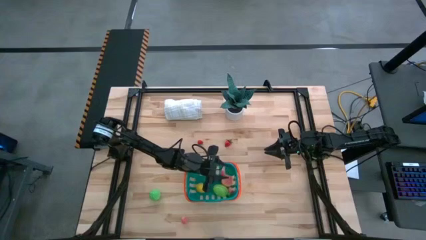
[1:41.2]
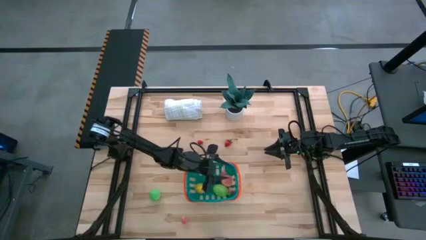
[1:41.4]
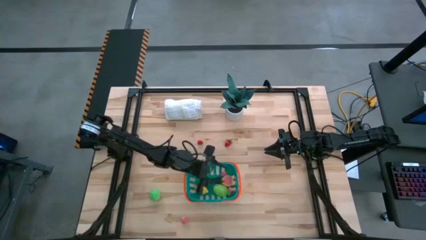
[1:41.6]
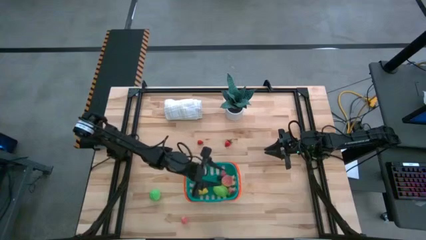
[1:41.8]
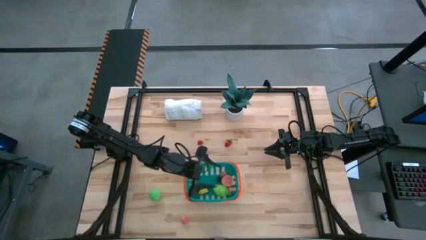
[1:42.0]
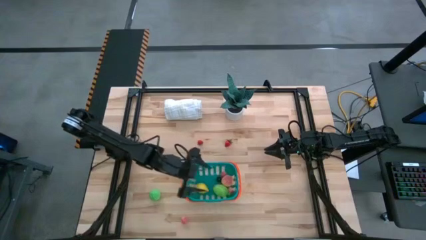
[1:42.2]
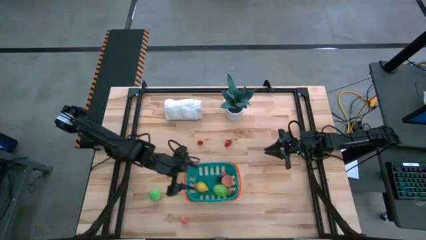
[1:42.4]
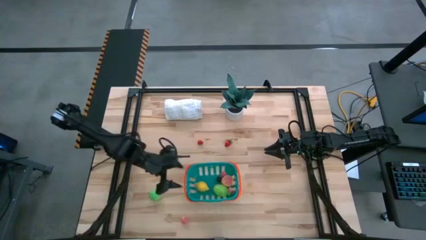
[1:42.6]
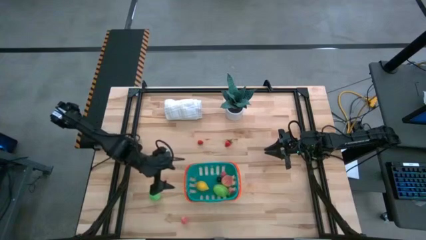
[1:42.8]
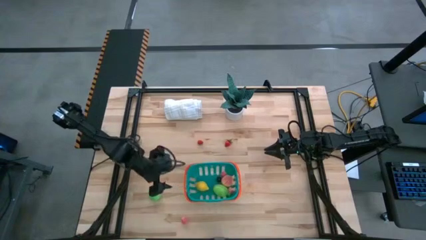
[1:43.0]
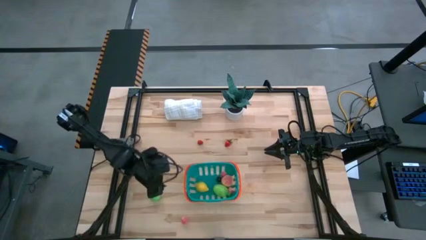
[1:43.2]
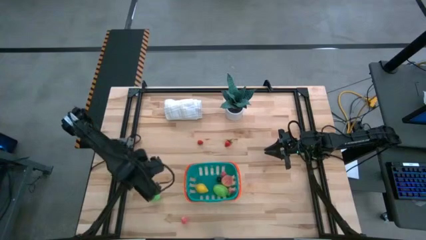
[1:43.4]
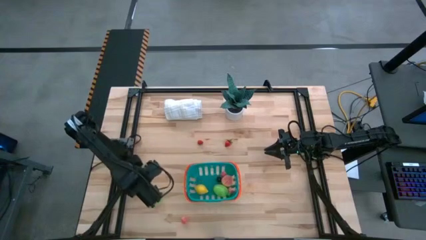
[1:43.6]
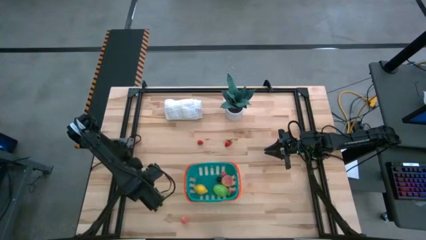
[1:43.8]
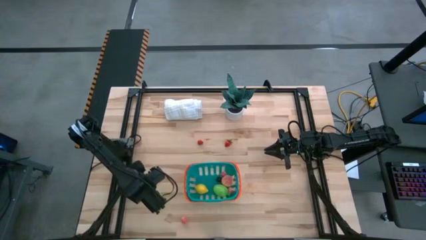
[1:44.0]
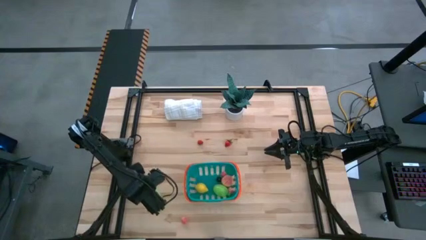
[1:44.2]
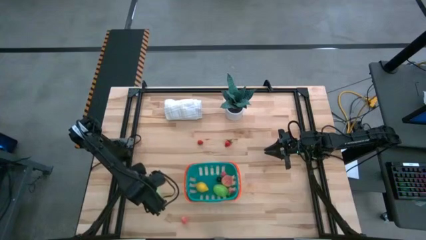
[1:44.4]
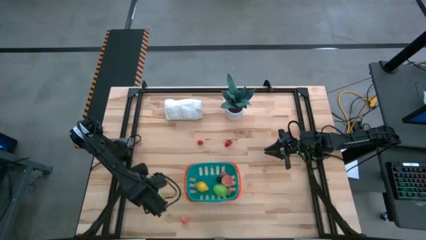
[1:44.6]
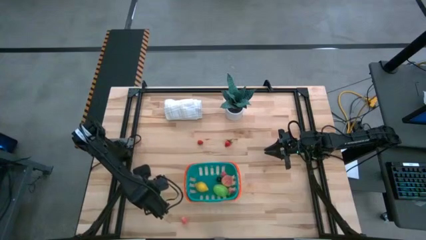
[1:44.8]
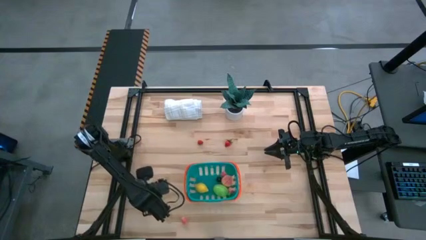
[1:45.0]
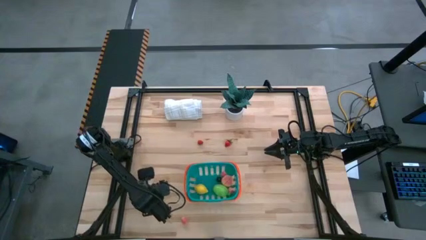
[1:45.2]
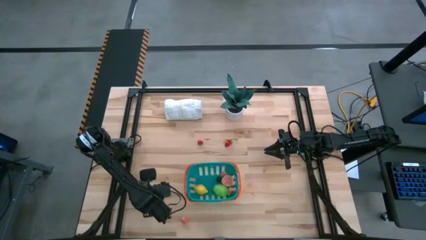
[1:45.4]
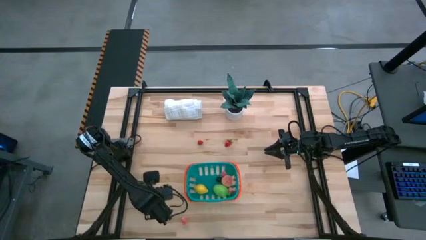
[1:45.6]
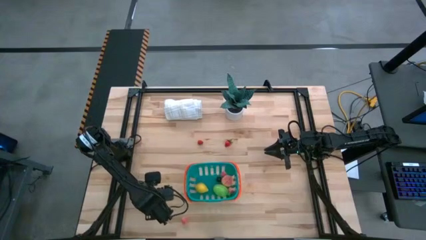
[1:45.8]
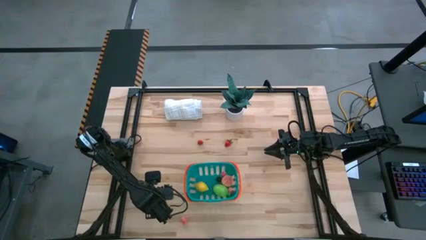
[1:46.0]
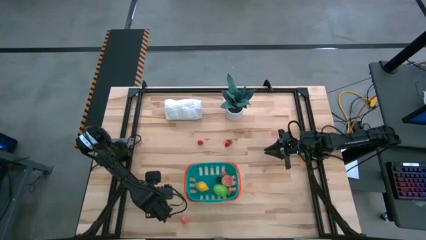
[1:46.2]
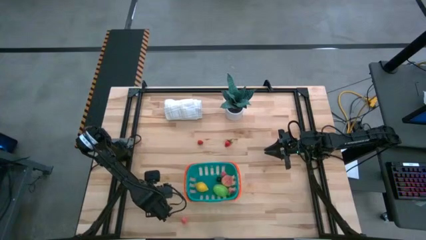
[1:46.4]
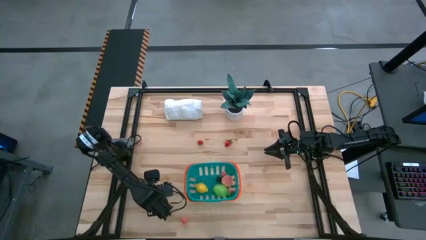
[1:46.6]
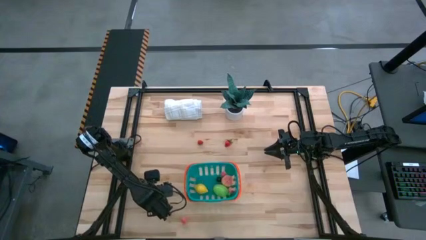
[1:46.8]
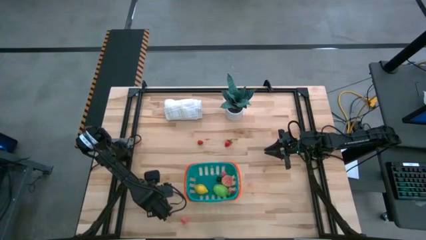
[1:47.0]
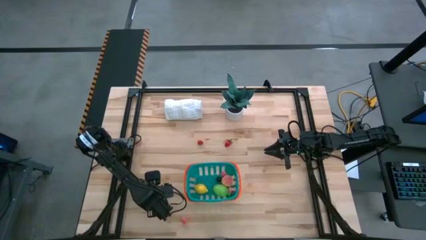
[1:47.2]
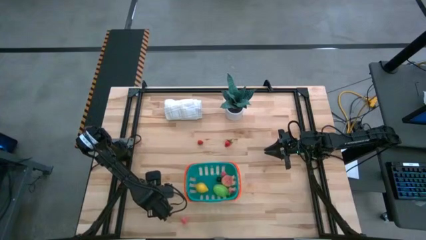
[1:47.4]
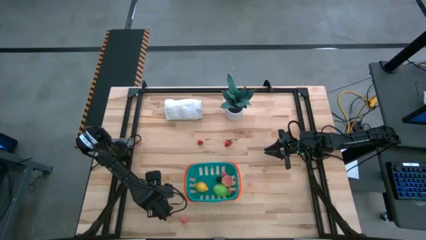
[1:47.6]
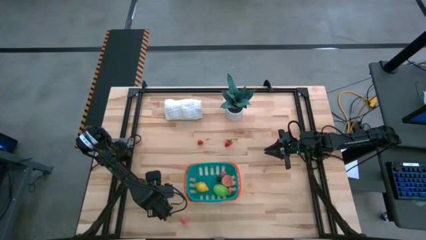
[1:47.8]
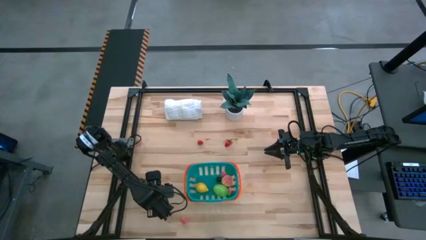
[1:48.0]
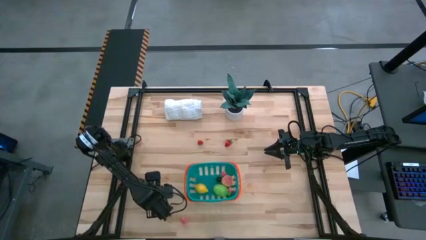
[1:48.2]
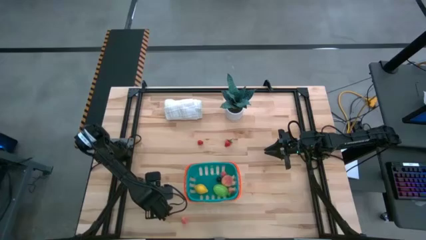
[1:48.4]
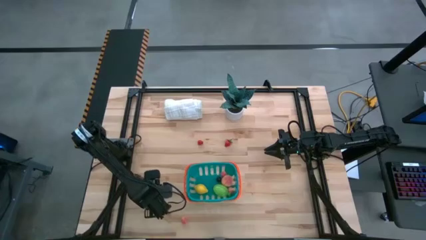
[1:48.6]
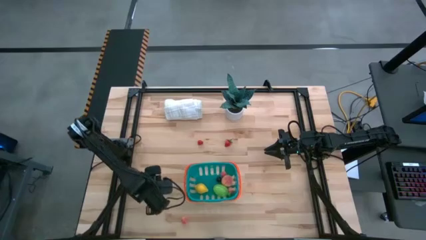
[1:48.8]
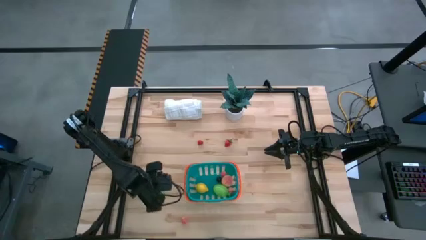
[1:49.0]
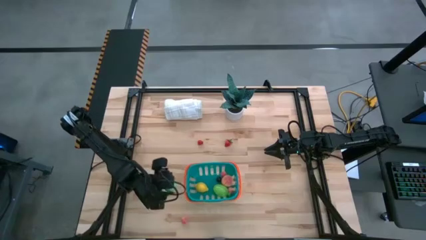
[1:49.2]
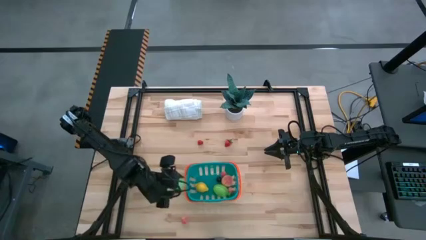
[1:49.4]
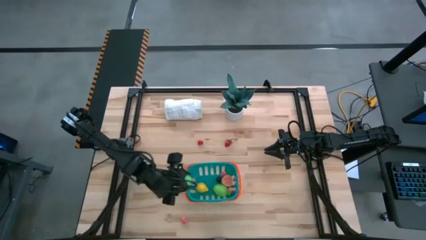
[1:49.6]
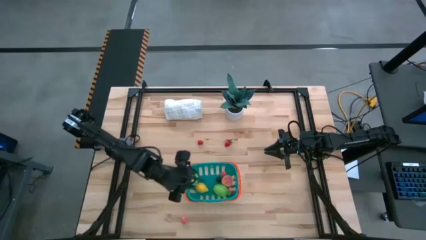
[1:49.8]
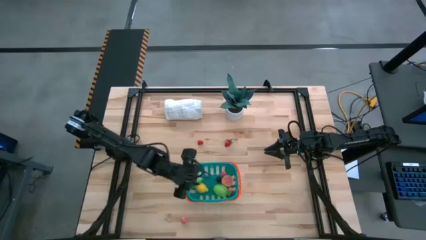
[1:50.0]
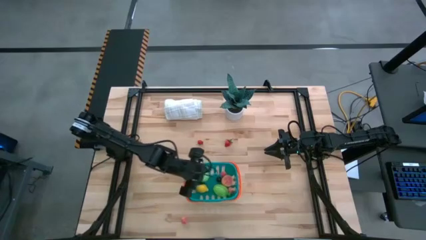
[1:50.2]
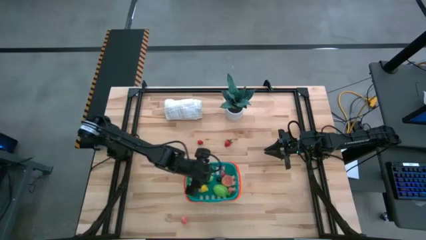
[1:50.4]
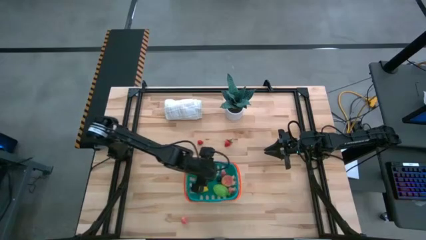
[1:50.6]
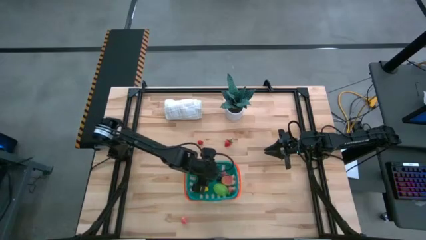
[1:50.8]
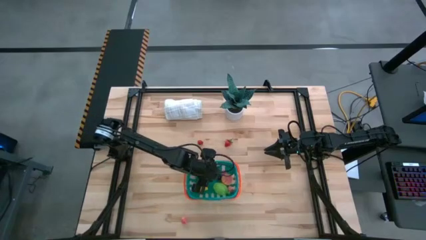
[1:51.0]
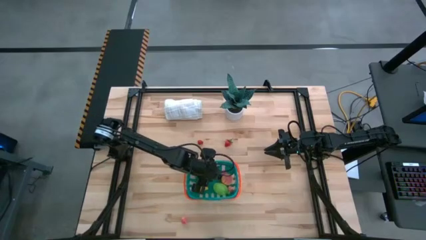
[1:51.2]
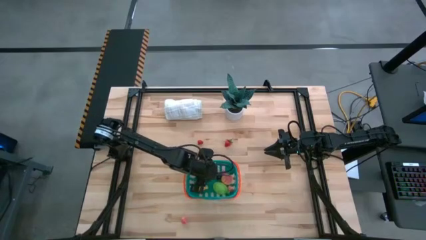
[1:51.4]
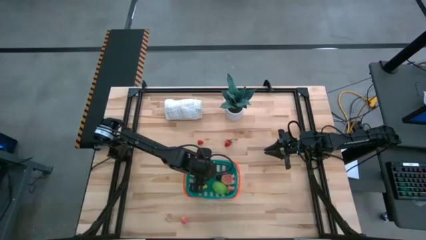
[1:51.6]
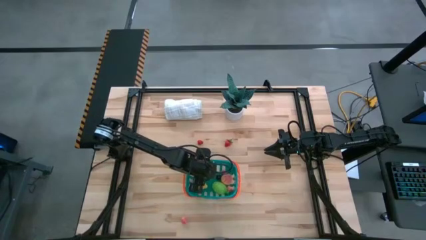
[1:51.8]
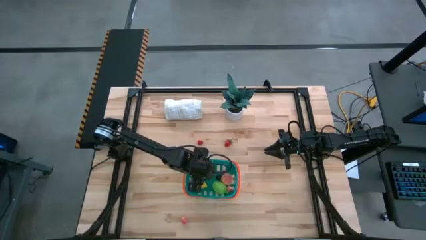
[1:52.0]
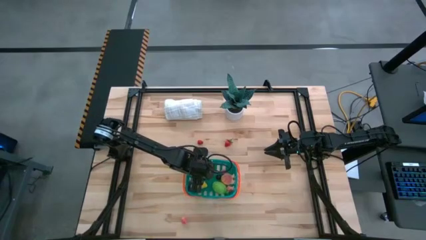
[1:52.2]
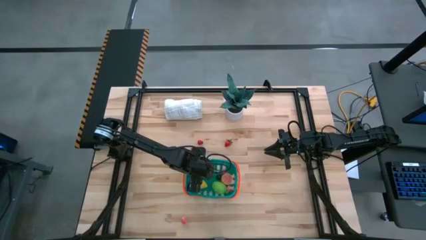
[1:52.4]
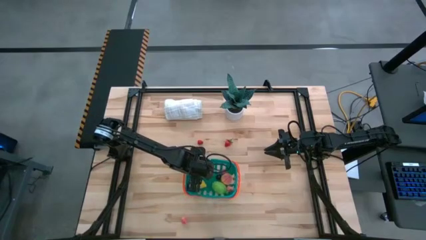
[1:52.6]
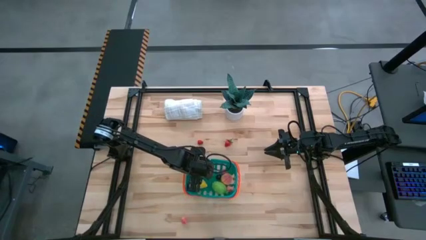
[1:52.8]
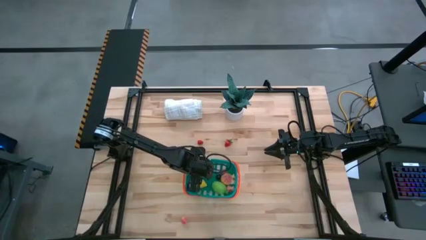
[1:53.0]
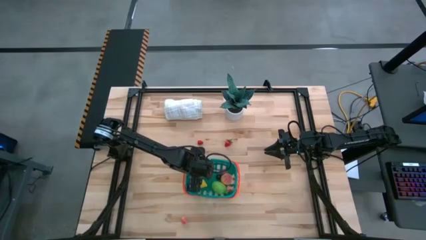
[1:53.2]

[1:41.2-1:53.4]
Task: Pick and placing Produce into tupperware
Put the green pear into the blue bin

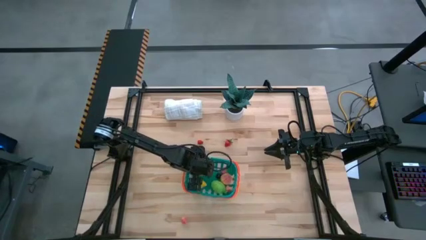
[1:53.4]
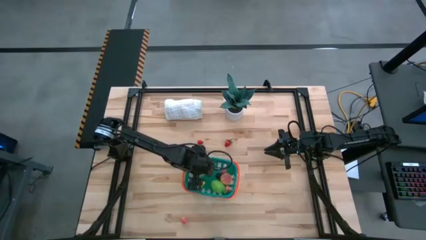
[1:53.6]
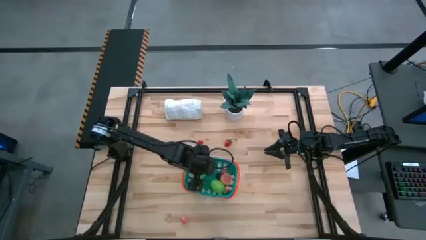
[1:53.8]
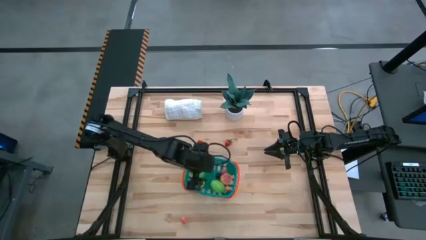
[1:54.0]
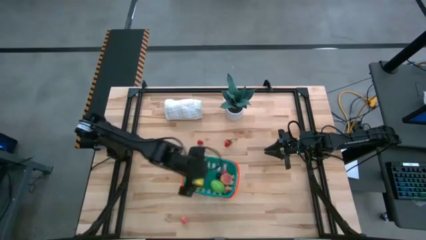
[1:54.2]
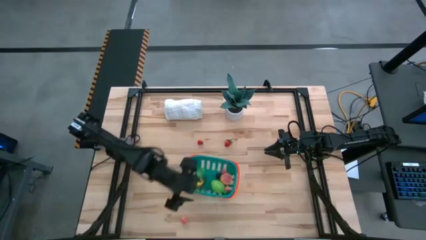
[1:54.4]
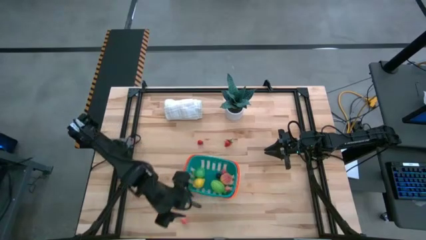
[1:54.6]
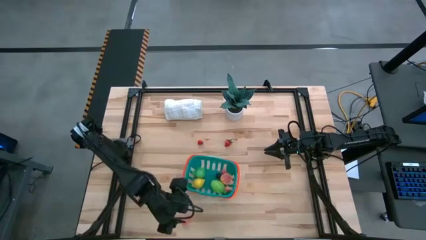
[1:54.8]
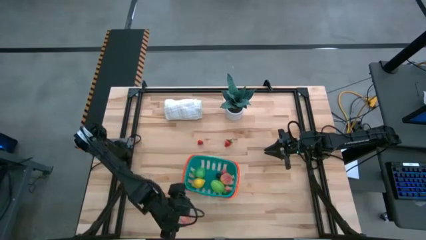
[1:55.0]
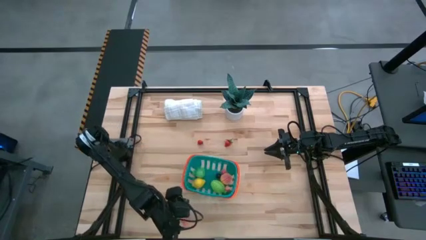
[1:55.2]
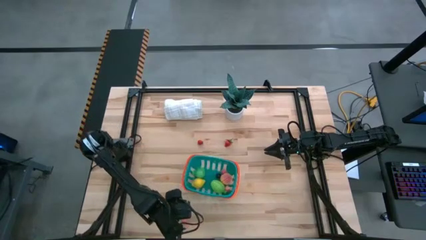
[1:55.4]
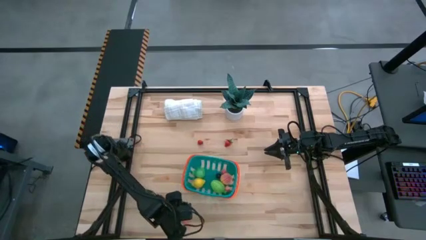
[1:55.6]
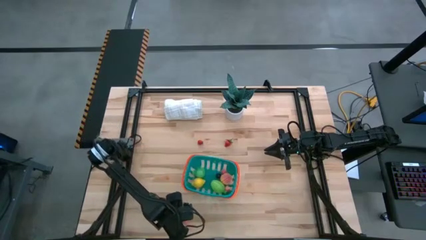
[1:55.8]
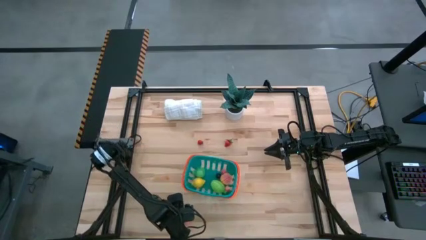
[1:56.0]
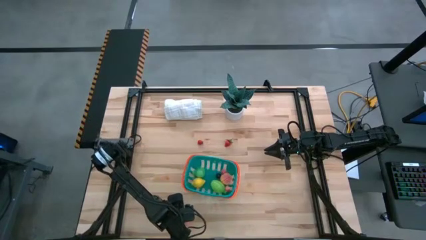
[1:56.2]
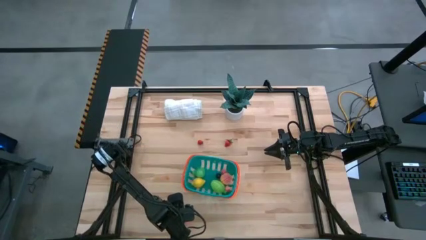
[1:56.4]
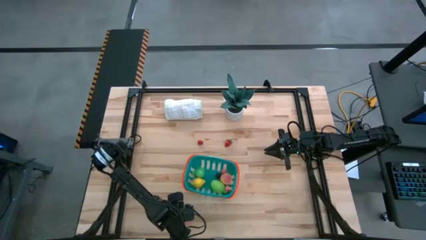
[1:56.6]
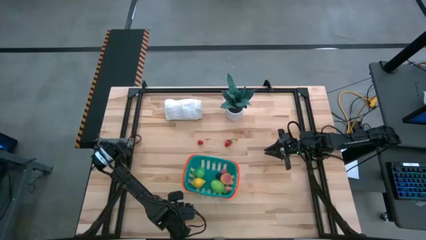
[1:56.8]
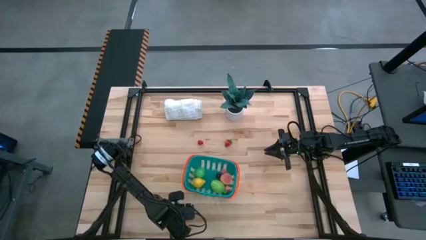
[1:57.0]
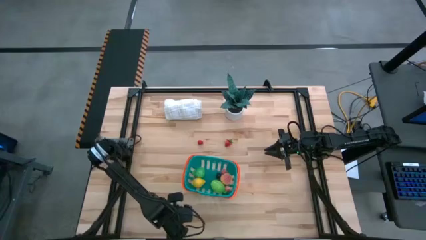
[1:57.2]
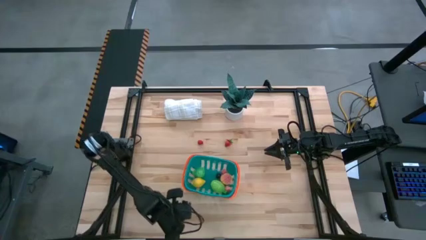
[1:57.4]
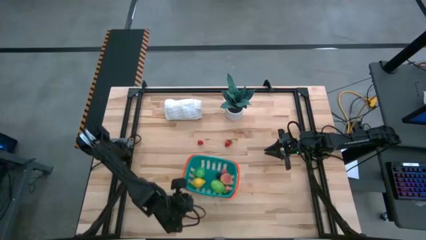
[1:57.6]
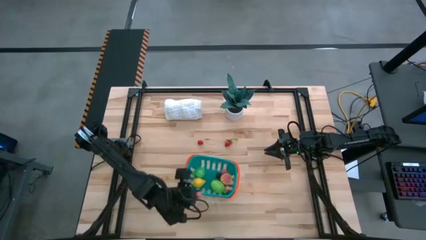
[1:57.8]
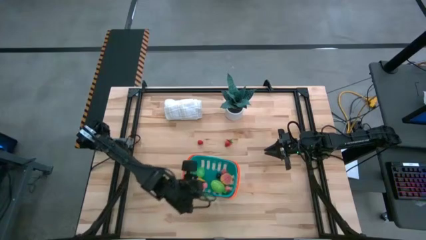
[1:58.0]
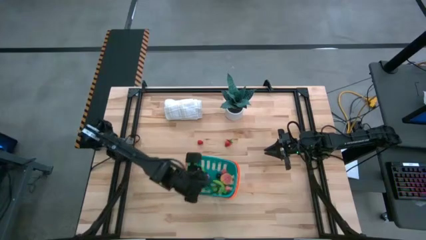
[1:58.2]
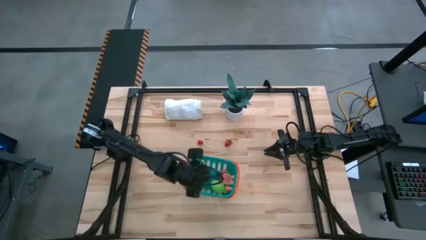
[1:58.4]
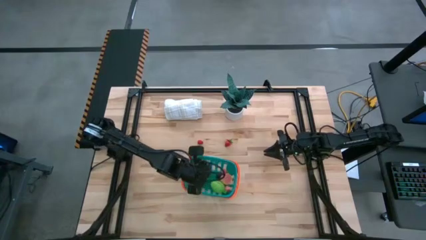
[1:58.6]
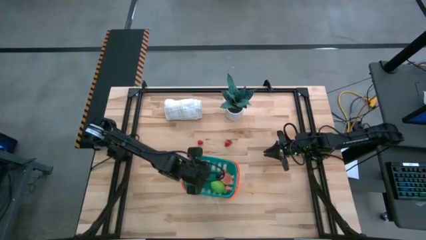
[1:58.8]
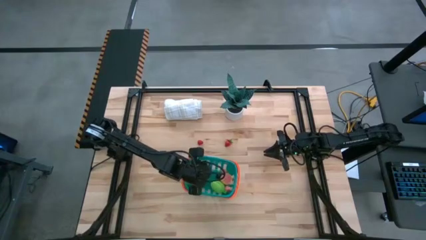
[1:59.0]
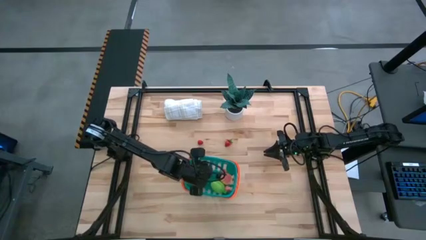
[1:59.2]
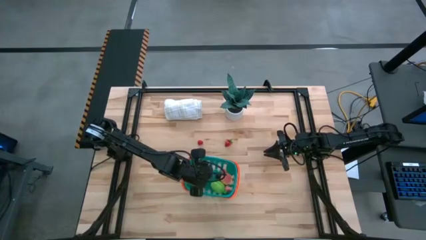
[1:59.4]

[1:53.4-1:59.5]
Put the small pink peach into the blue bin
